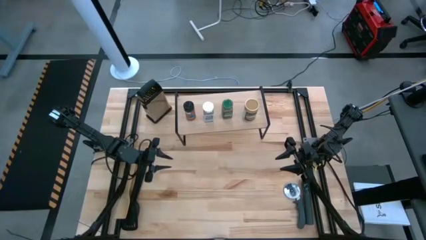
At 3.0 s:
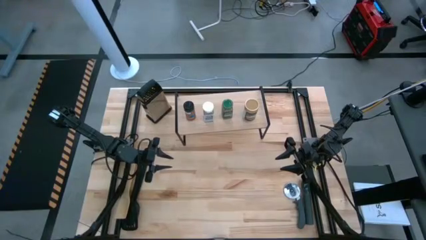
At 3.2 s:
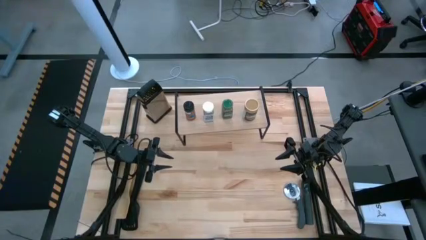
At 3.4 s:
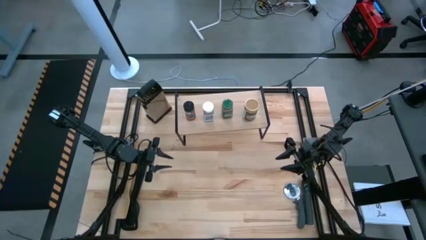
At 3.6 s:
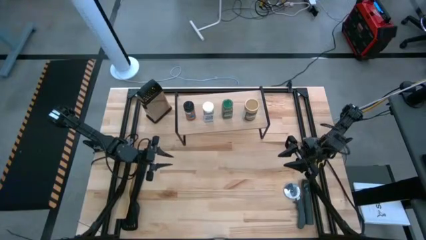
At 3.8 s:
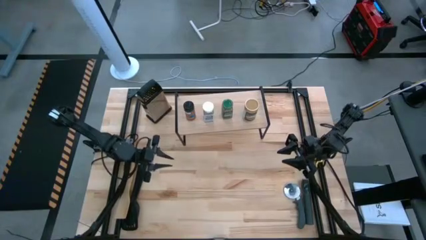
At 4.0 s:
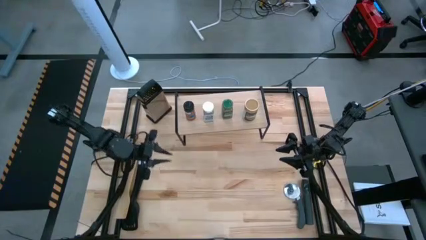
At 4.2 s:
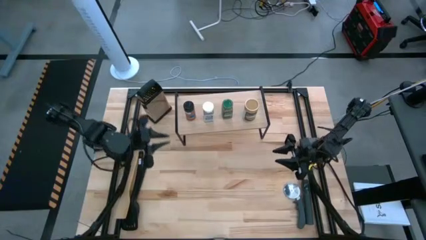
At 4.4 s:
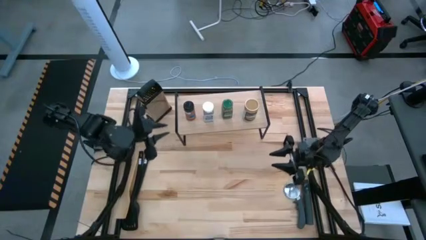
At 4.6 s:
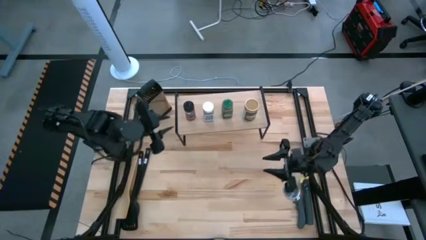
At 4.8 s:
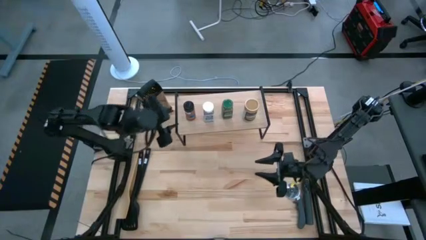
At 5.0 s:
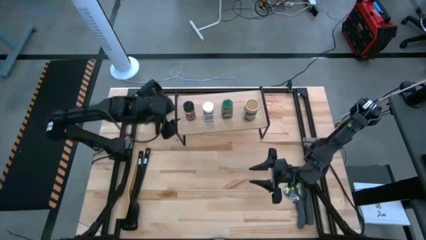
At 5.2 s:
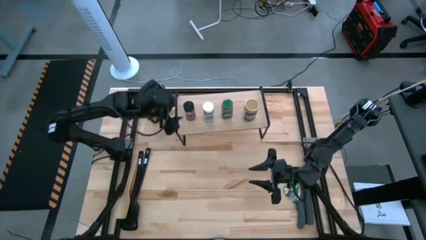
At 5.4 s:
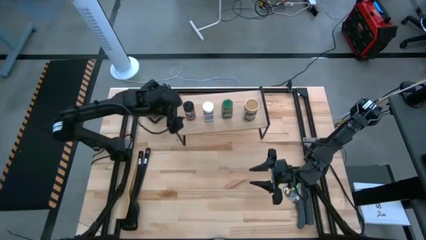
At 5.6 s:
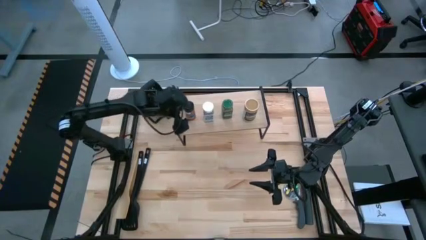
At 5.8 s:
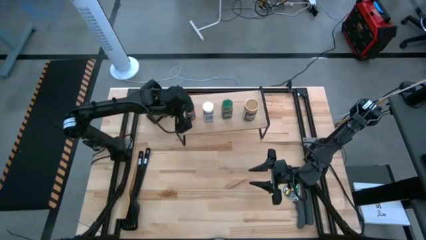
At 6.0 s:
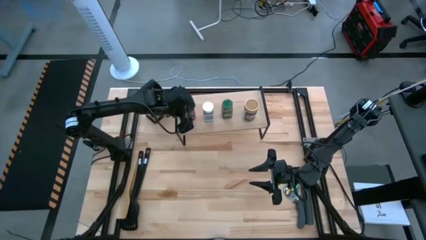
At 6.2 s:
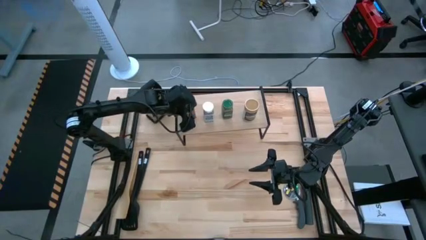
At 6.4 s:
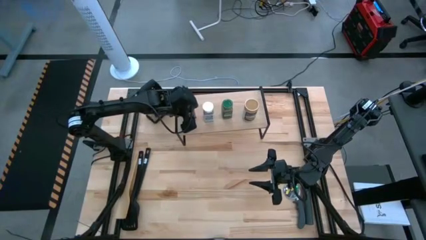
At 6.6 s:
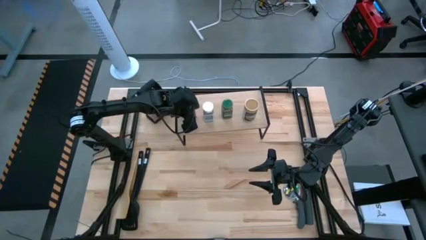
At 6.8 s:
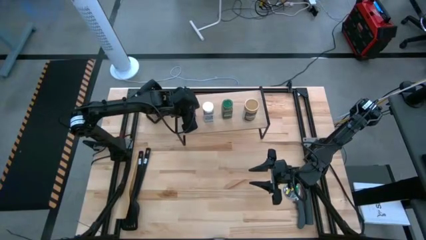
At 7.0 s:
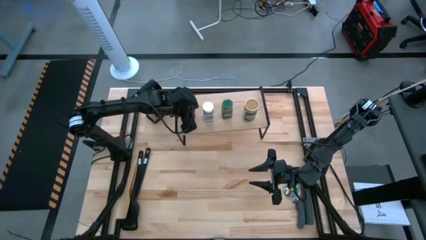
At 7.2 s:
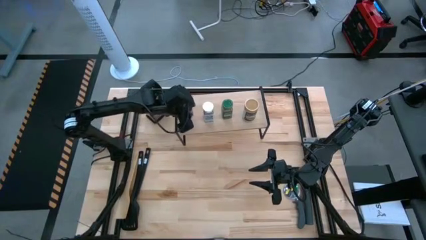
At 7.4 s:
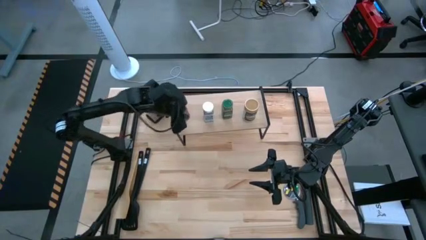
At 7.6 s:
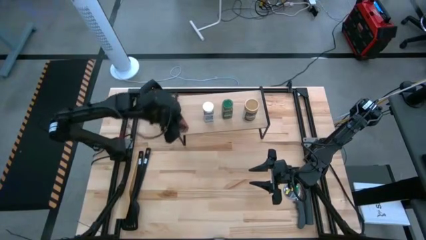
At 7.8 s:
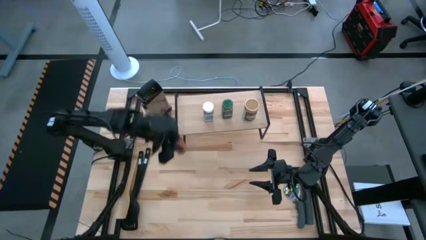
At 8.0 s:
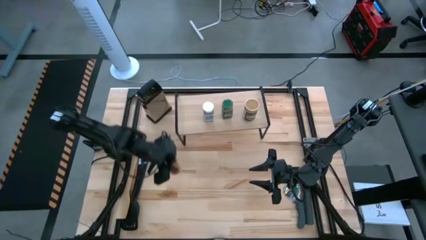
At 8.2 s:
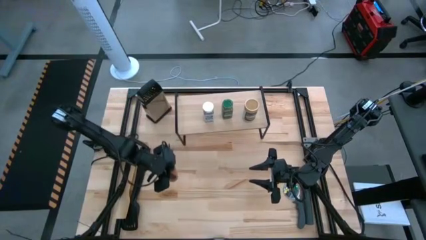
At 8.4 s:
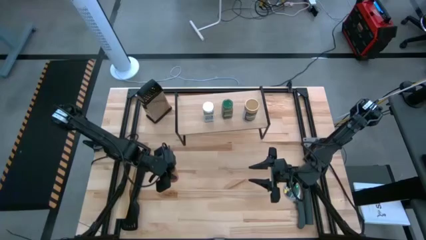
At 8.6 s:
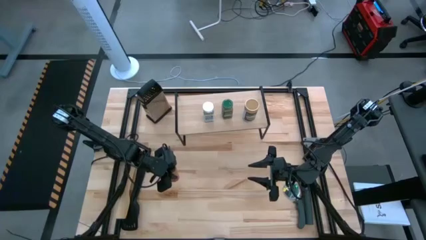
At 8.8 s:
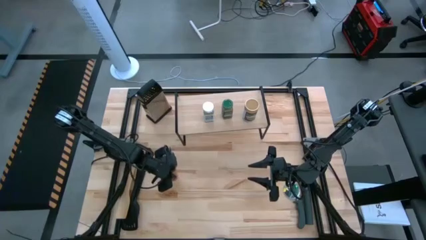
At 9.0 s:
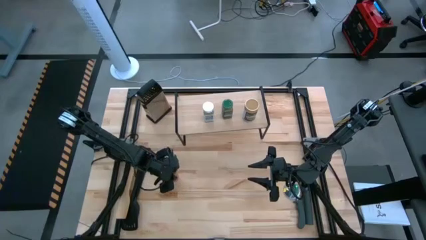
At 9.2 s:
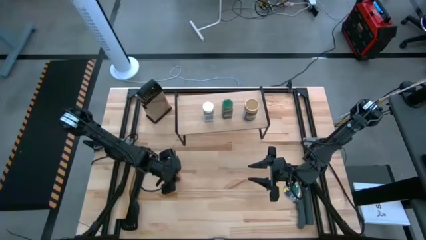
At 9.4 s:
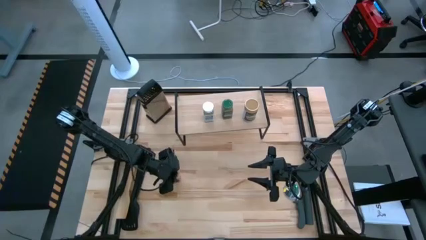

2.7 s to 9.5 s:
Task: Shelf spices
Remove the black seasoning bottle from the shelf

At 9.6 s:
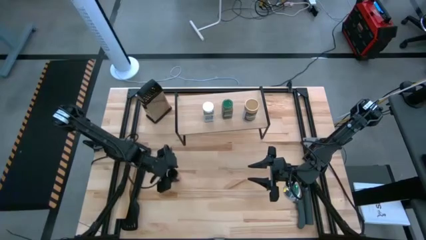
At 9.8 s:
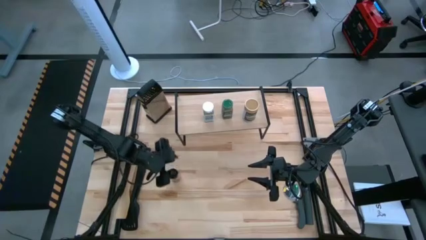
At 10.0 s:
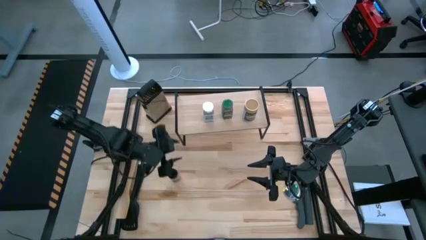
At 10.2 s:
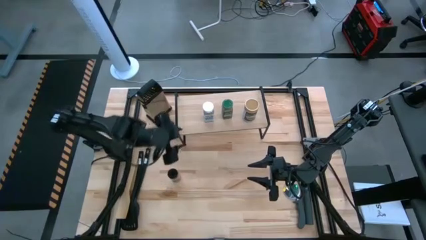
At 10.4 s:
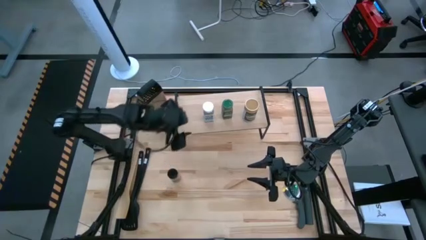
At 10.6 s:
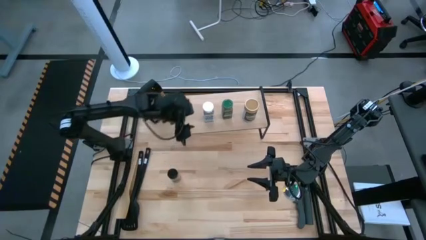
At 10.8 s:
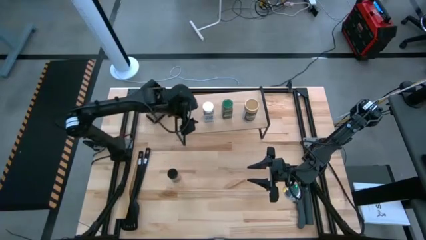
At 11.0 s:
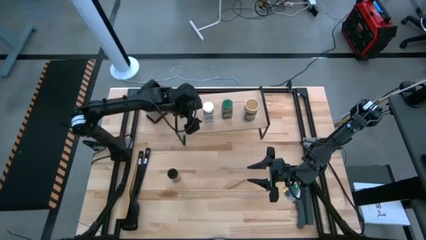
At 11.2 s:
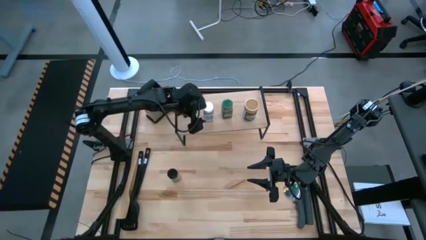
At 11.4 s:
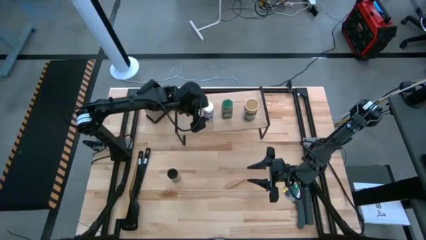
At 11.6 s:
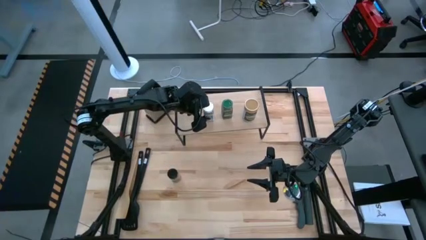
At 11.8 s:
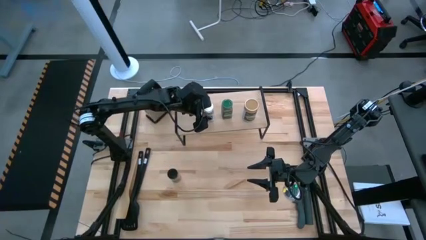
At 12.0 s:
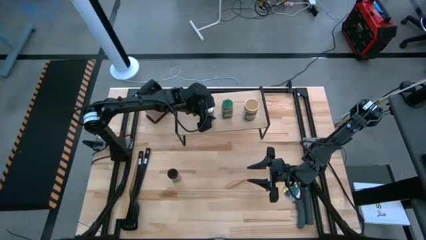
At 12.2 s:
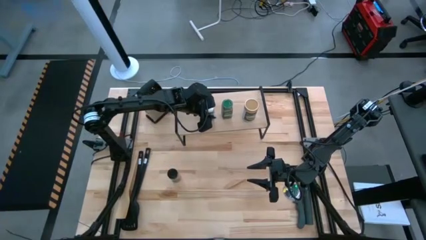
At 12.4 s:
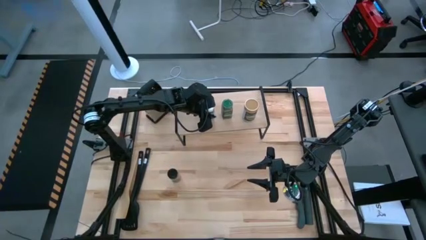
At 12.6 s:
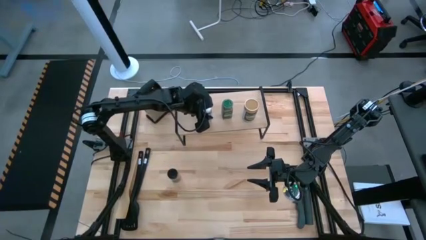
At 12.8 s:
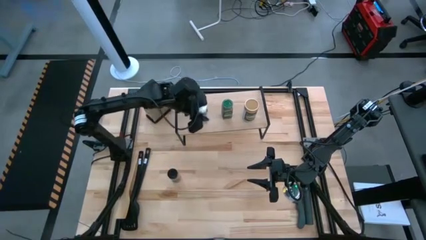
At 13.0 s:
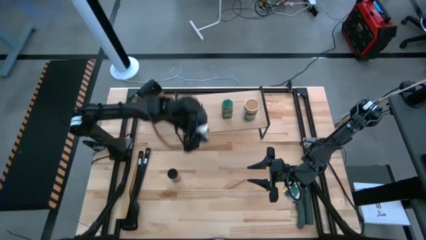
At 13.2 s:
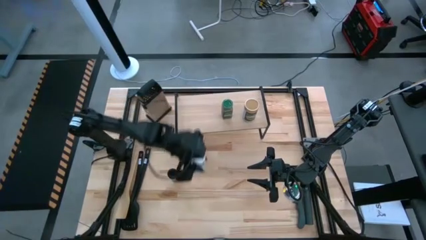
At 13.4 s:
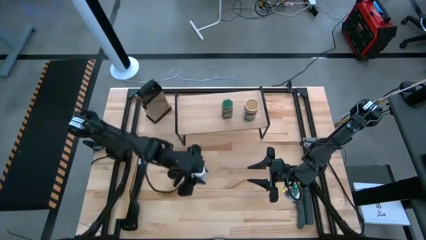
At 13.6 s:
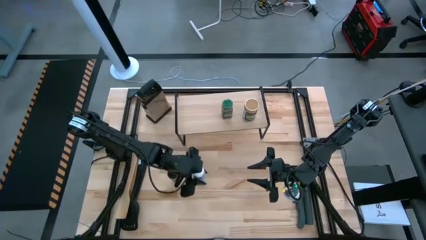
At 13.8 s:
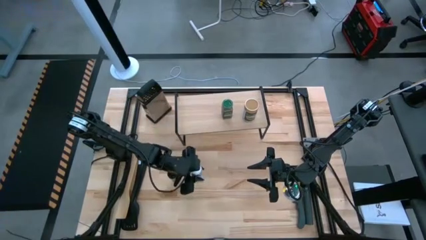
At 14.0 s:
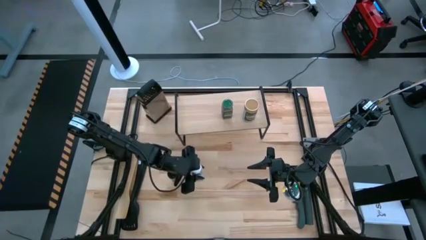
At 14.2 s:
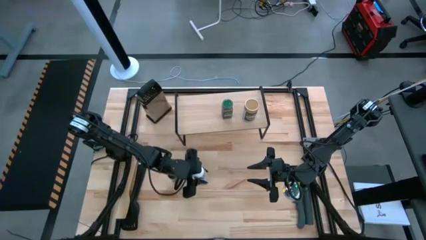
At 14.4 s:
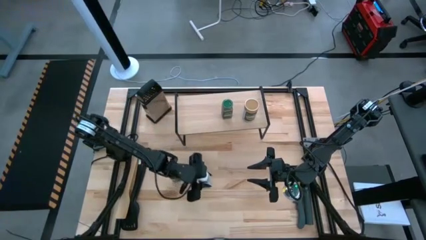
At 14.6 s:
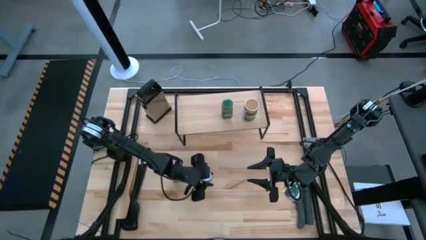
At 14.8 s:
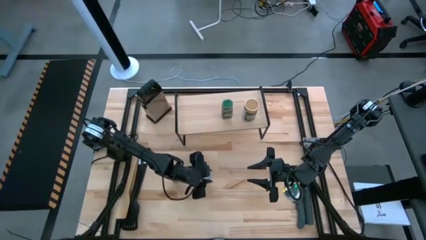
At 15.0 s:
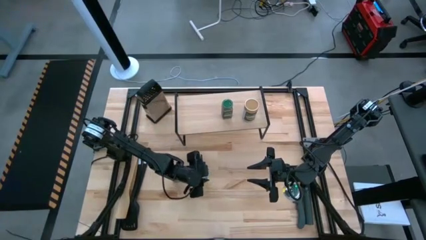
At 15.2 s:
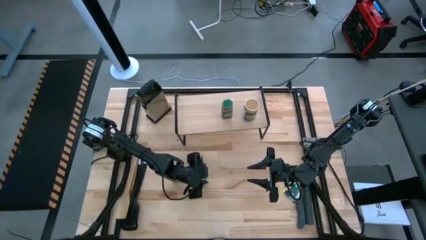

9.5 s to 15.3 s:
Remove the white seasoning bottle from the shelf

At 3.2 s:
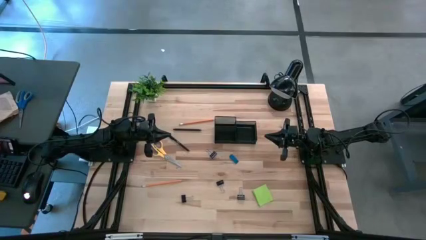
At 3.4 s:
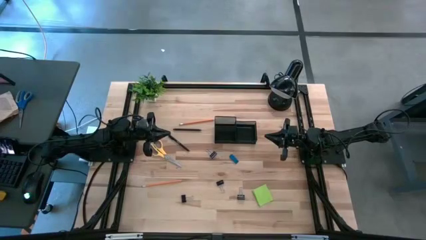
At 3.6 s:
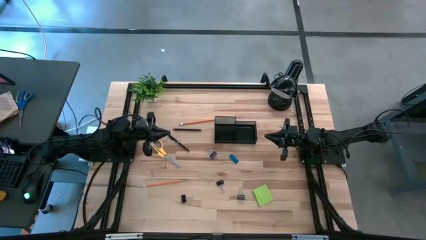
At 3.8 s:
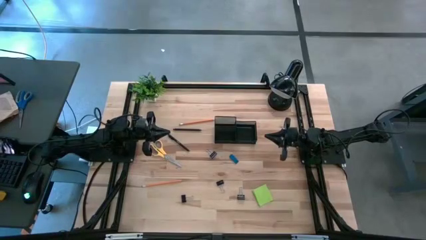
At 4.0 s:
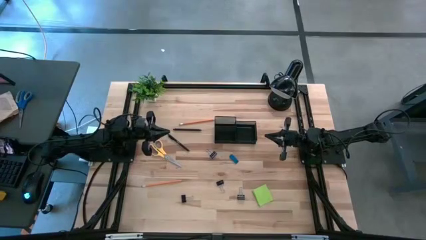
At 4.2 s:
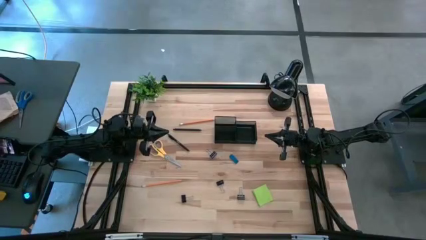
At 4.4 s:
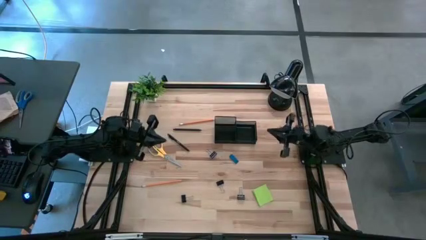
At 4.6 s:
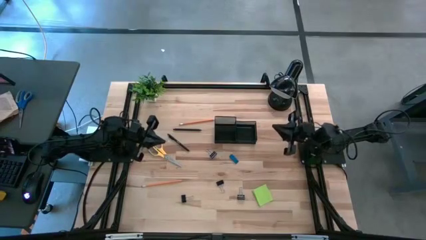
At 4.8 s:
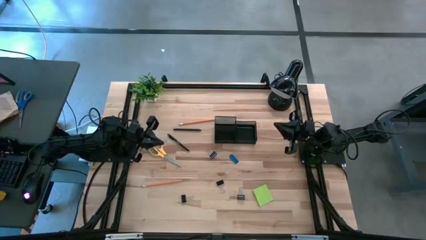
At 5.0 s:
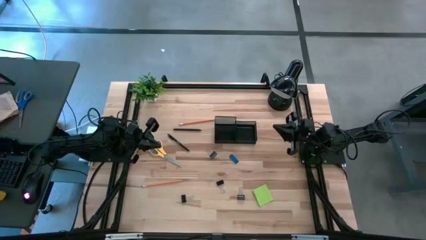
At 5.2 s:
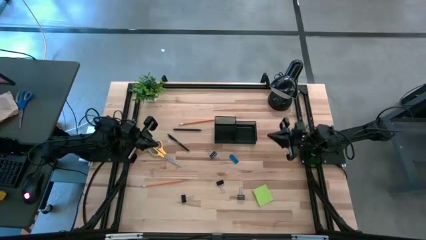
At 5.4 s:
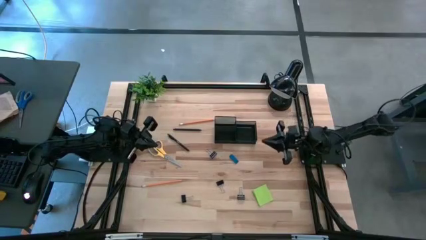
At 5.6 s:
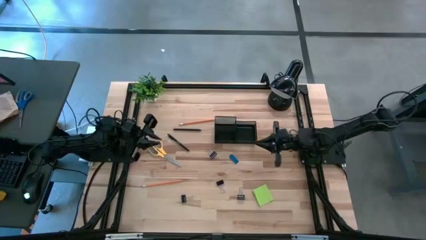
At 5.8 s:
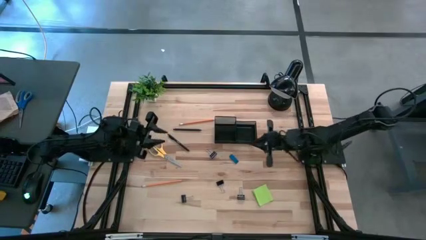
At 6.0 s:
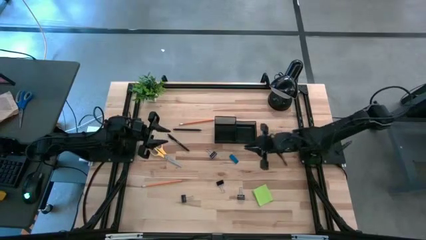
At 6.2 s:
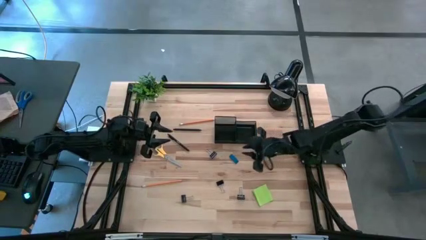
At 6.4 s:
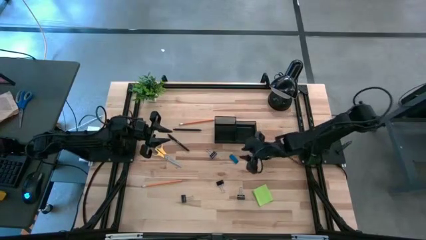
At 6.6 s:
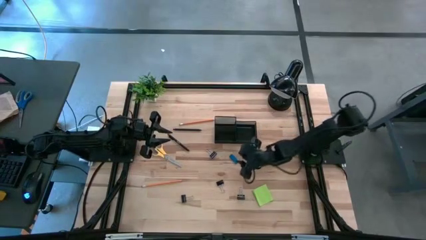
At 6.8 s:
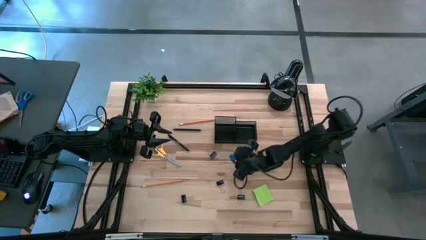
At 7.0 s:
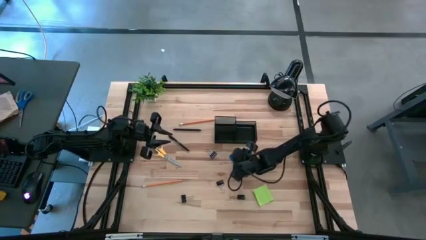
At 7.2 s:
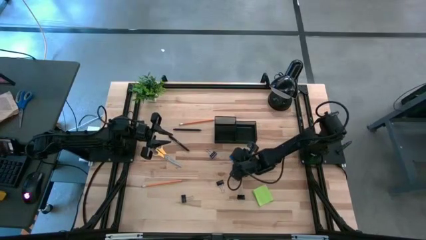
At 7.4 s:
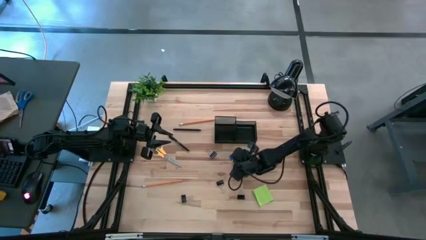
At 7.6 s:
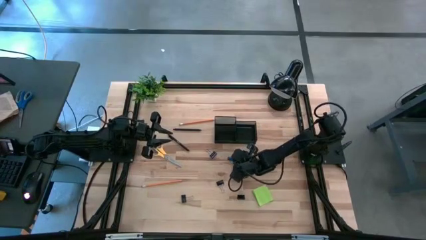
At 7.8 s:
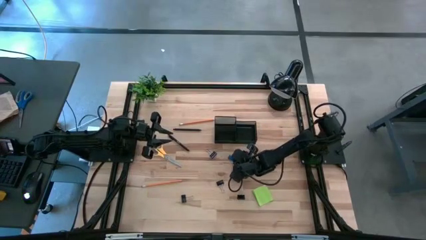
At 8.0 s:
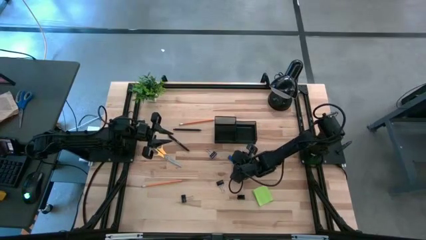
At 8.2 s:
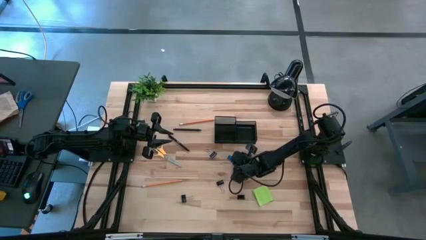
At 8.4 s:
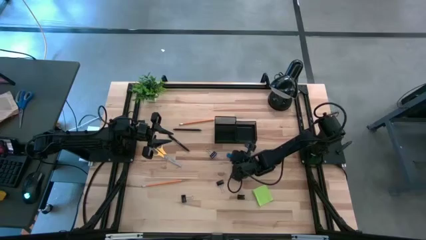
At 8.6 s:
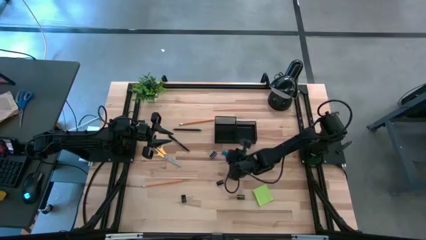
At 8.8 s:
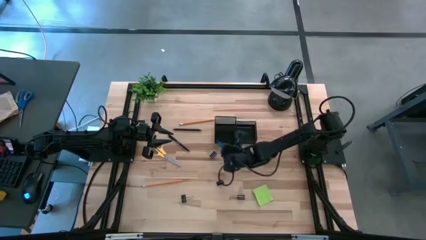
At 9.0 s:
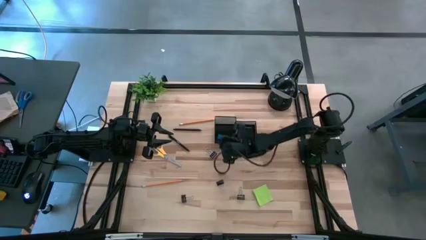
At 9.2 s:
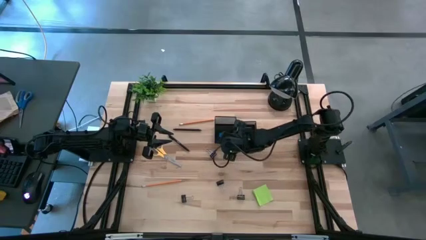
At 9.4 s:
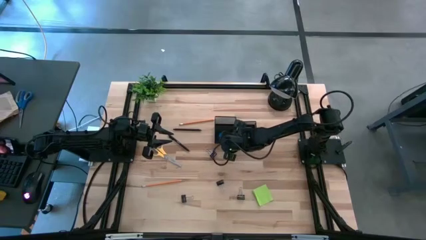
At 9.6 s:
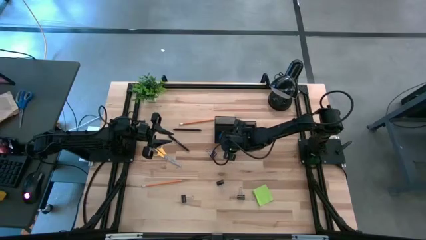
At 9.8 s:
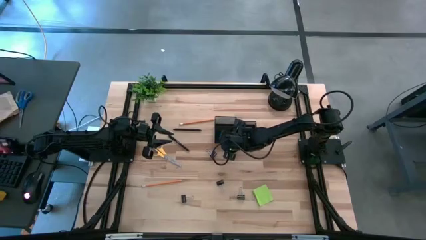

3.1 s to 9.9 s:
Task: Pick and place office supplies into organizer
Put the blue eraser into the desk organizer
